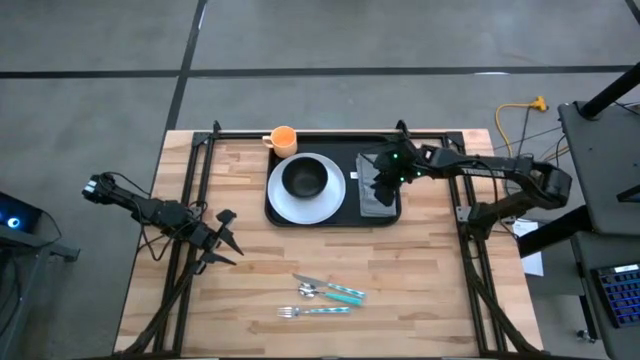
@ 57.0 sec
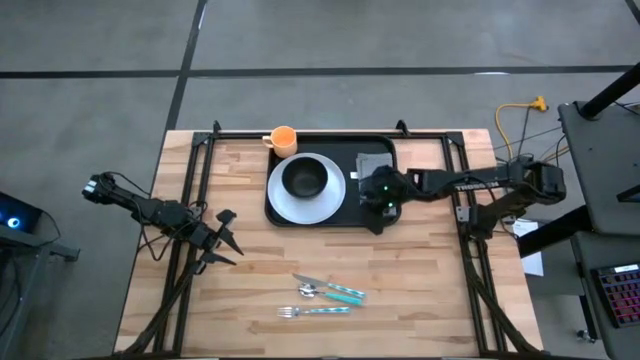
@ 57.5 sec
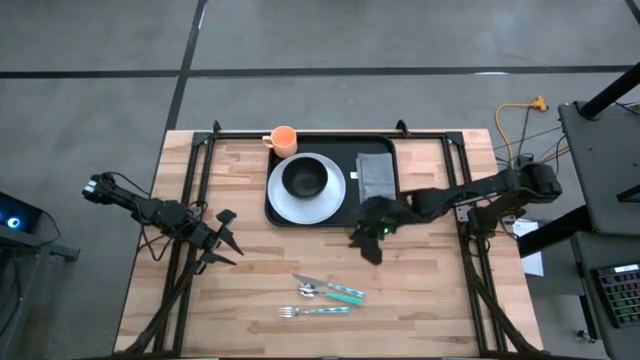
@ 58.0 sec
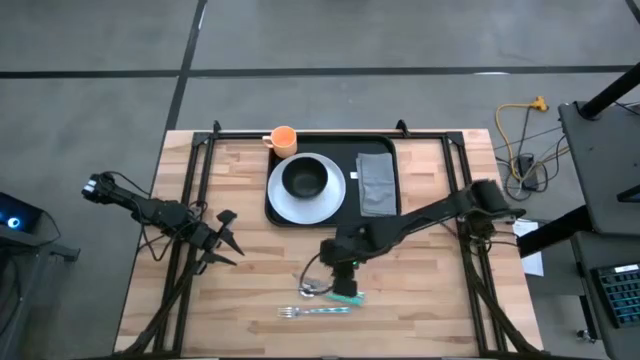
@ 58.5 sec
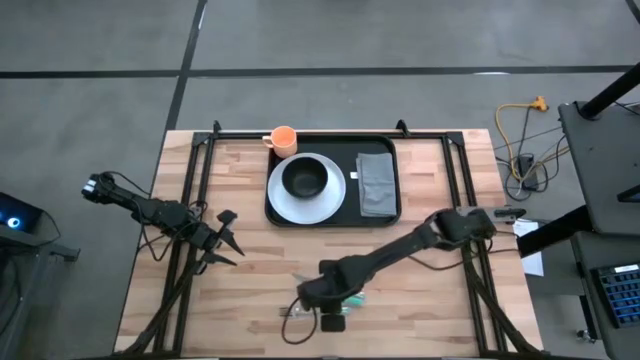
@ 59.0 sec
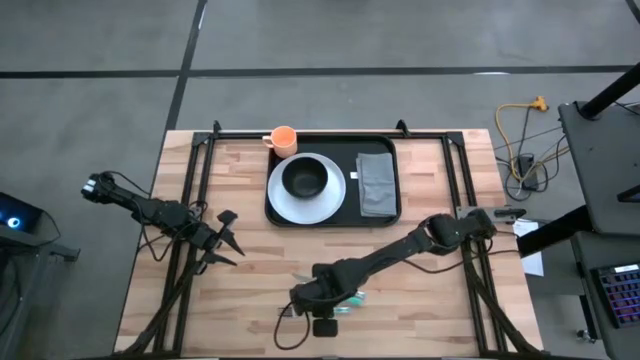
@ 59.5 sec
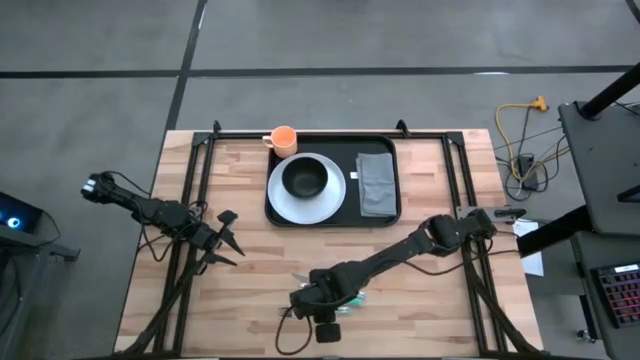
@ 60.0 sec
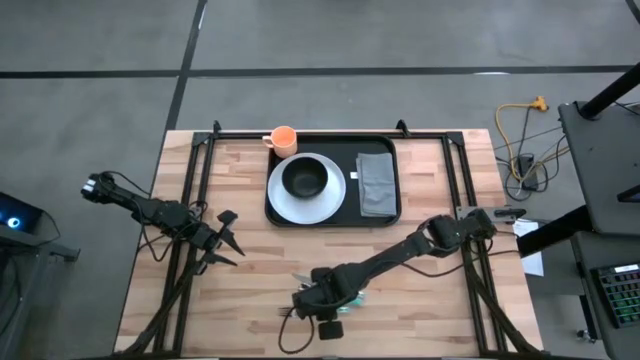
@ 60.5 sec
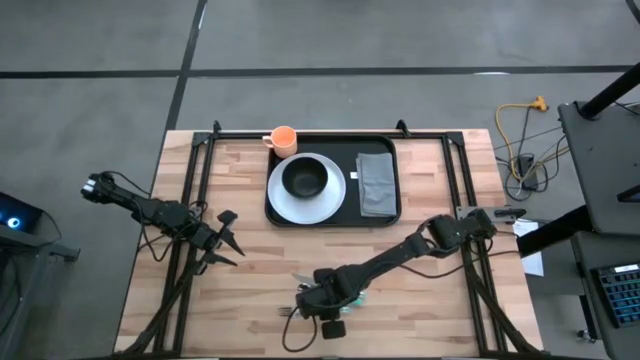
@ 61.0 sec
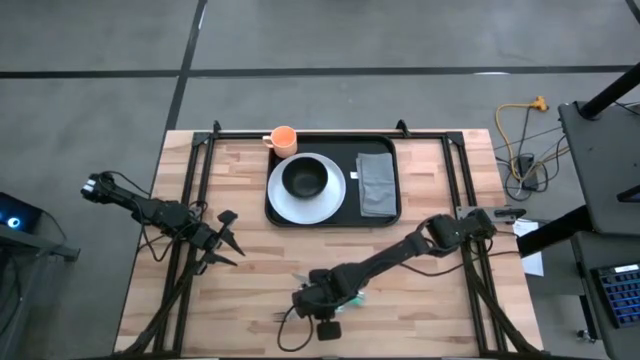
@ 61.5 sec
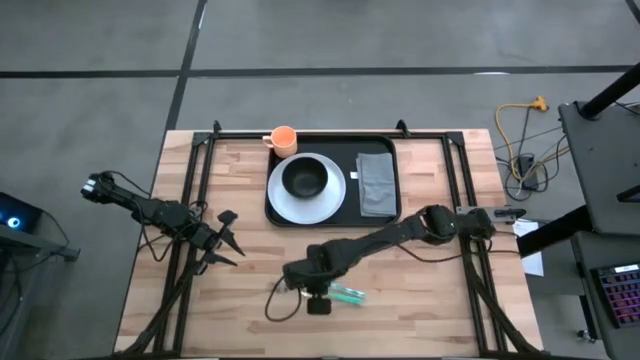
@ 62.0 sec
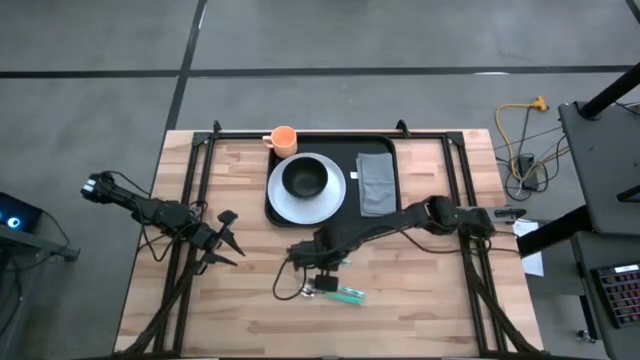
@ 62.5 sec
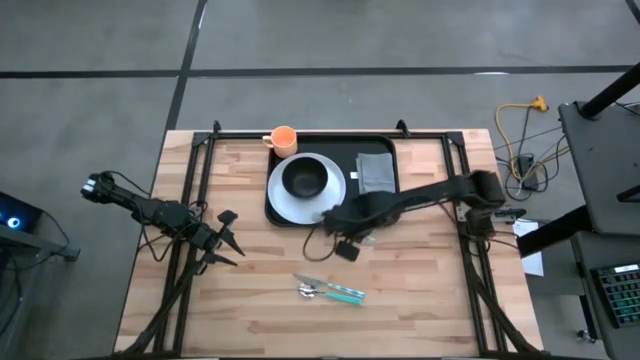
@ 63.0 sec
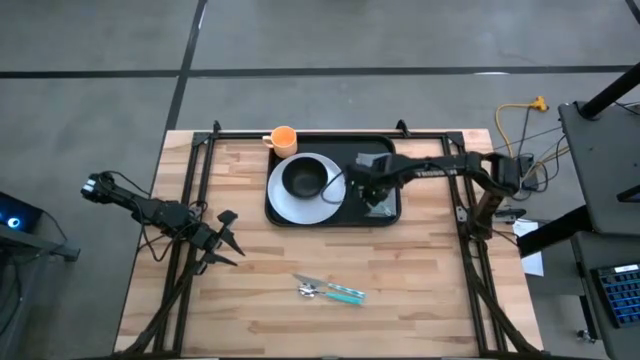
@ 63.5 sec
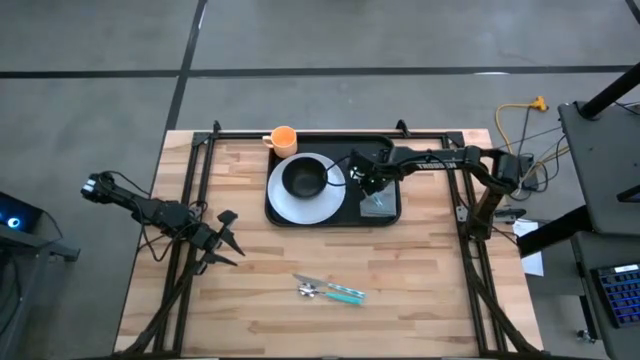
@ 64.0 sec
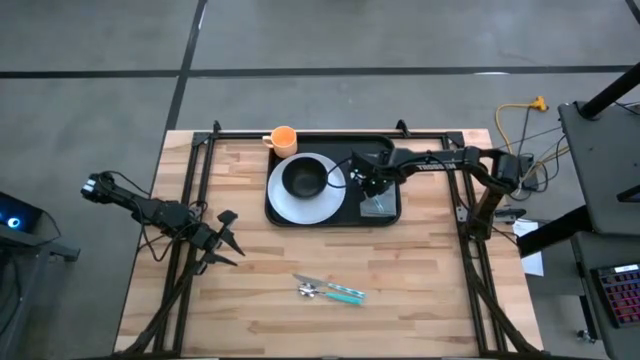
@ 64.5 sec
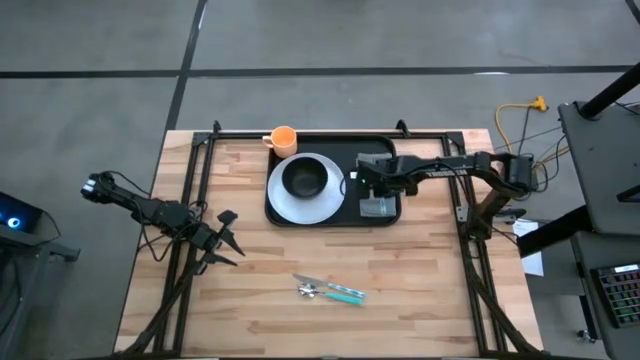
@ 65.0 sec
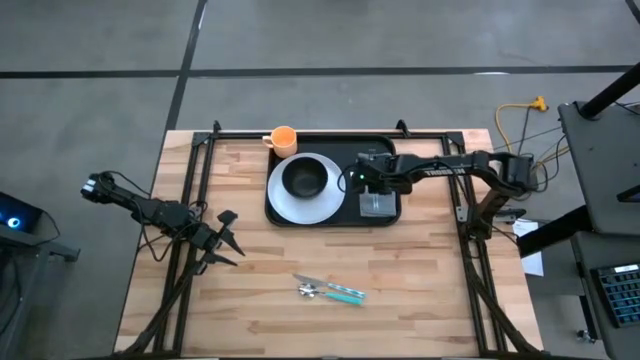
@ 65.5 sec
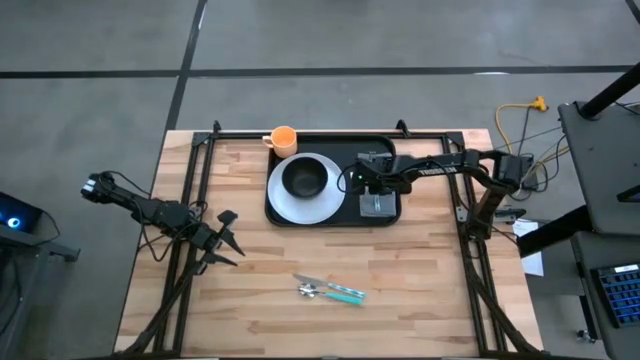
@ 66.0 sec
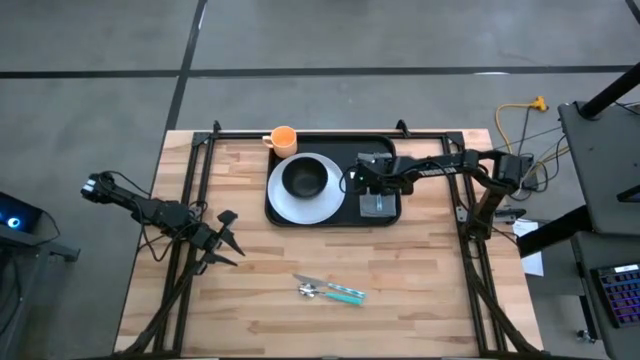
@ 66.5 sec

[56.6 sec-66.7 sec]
Task: Set up tray
Put the green fork on the gray napkin

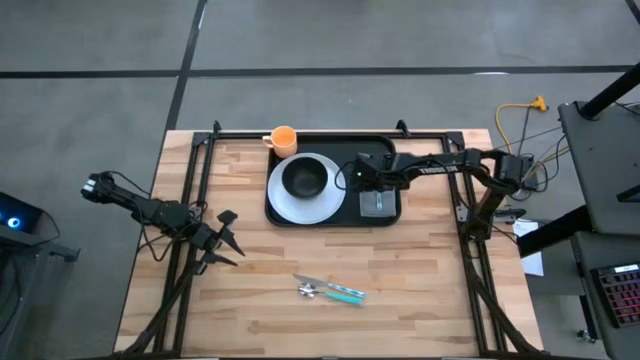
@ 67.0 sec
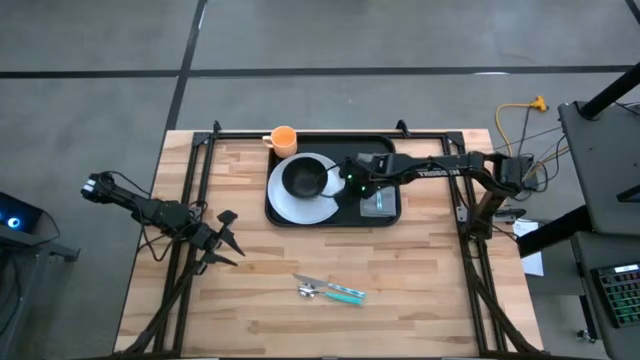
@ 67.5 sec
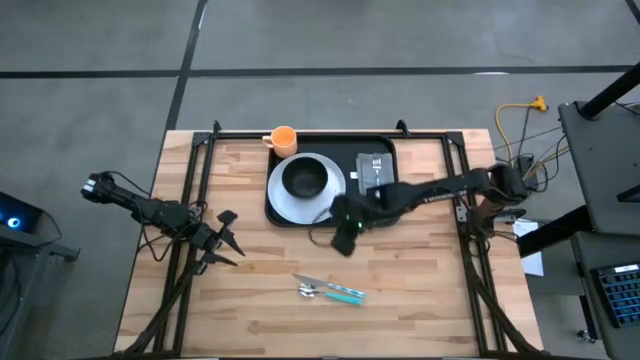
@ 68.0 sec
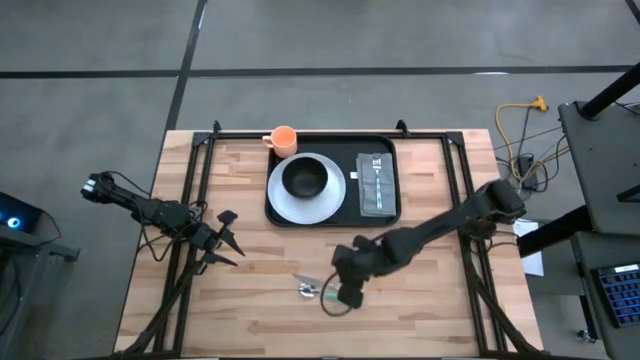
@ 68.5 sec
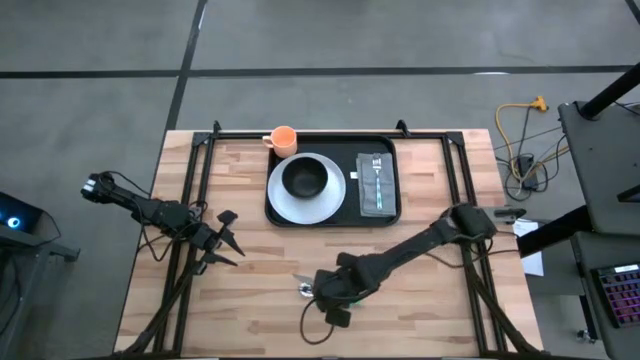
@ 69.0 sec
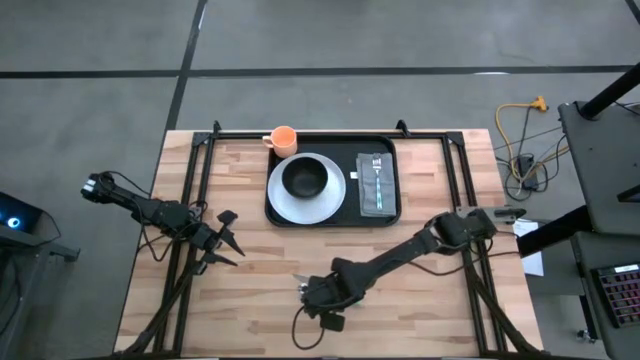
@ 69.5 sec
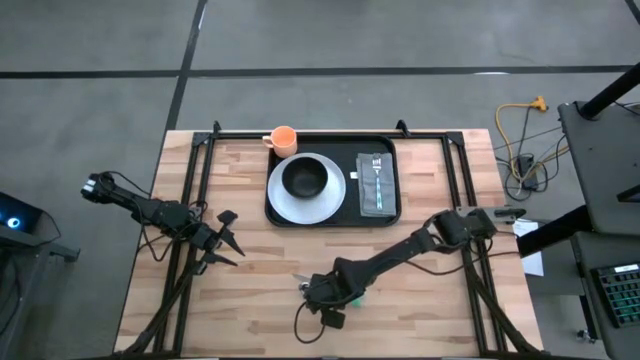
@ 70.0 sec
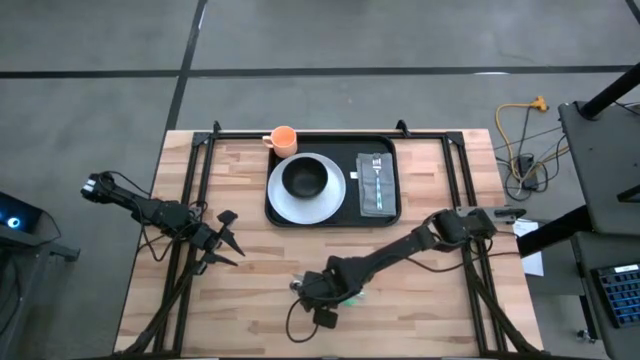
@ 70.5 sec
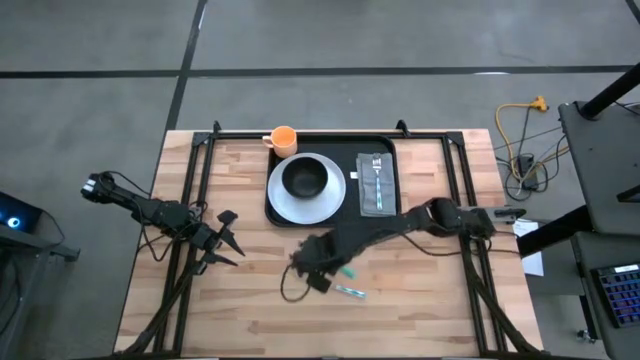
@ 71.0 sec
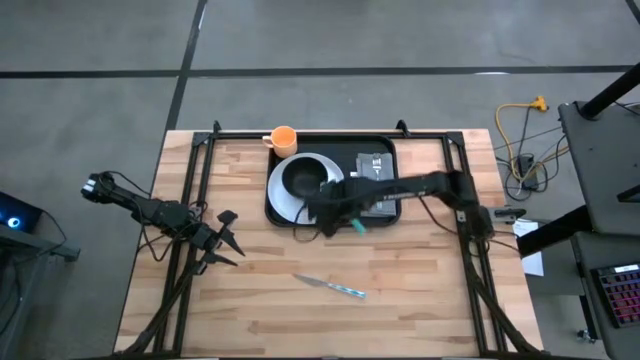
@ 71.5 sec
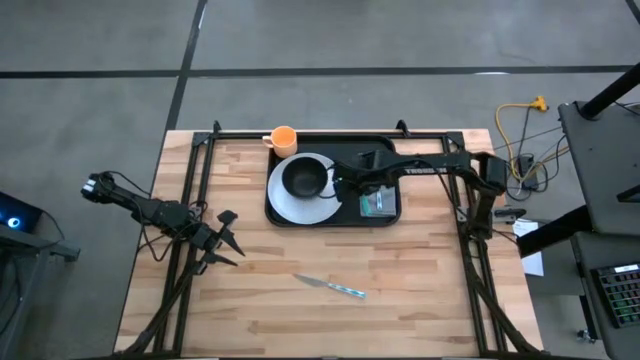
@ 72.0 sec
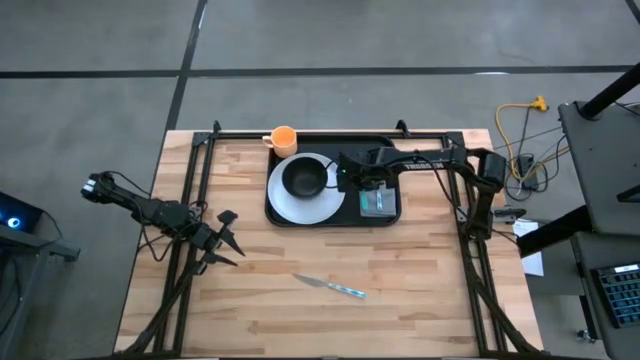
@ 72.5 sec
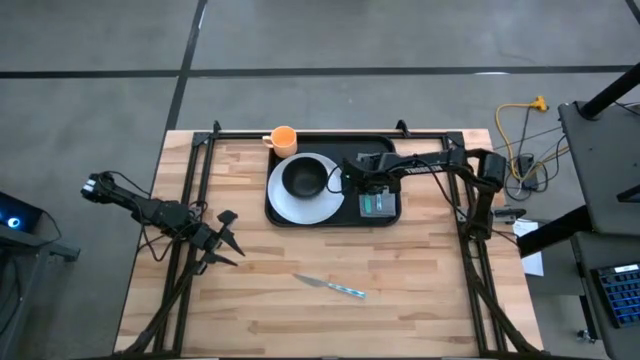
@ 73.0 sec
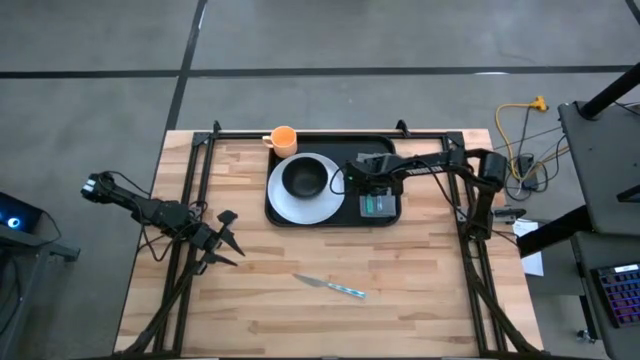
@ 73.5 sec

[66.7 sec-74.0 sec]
Put the green spoon on the gray napkin

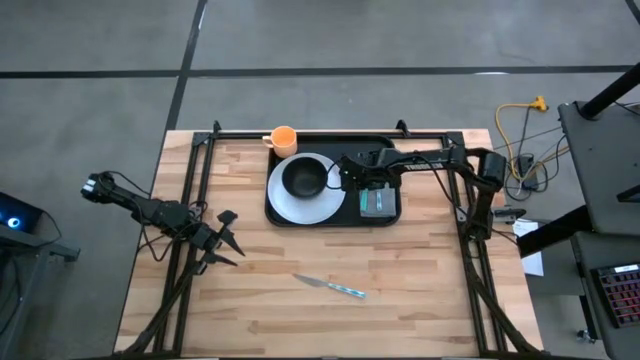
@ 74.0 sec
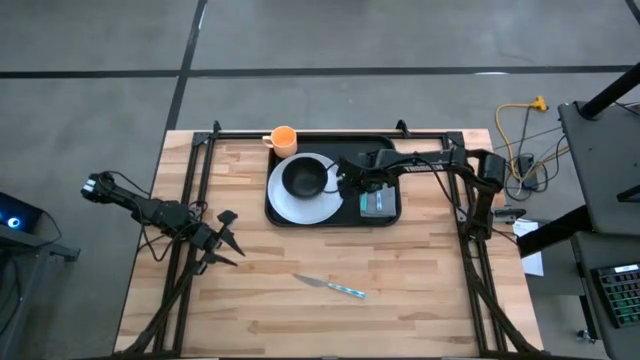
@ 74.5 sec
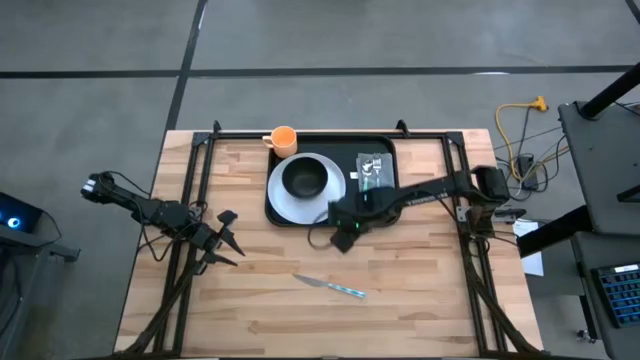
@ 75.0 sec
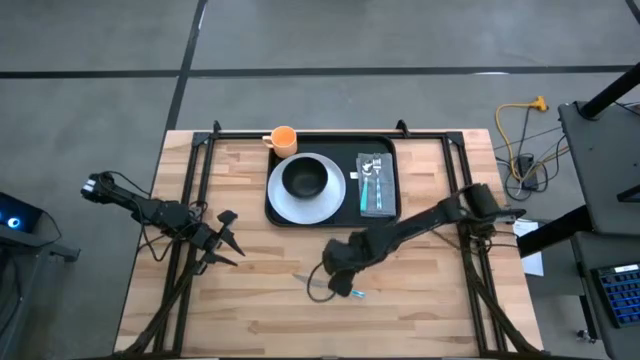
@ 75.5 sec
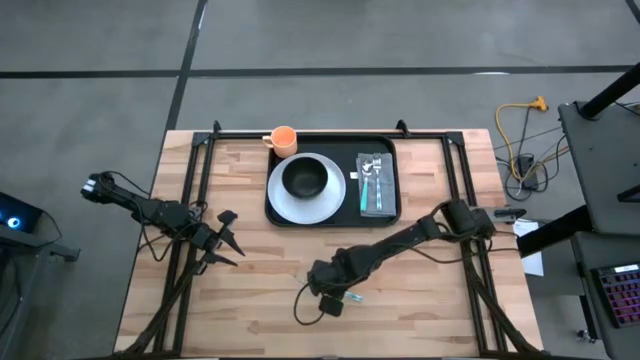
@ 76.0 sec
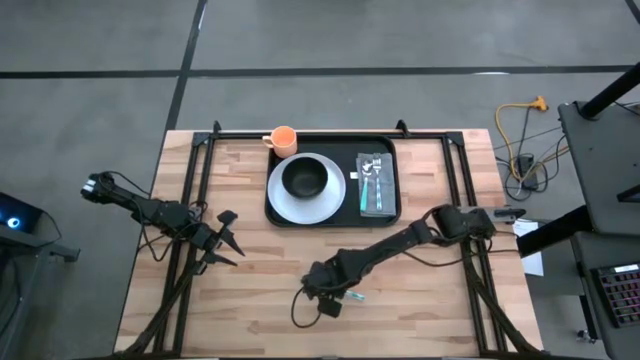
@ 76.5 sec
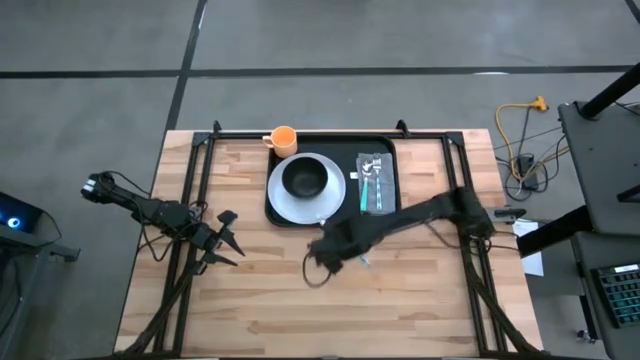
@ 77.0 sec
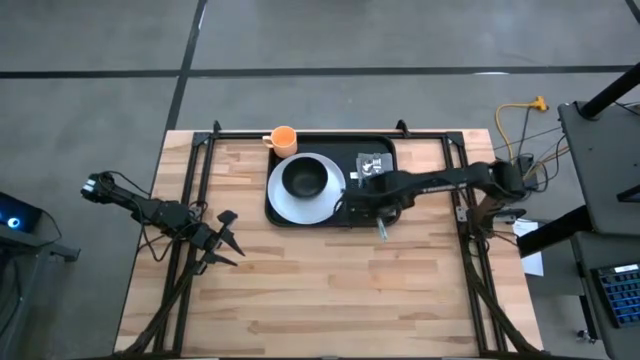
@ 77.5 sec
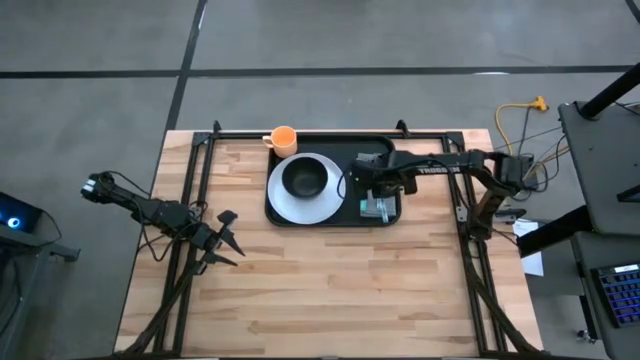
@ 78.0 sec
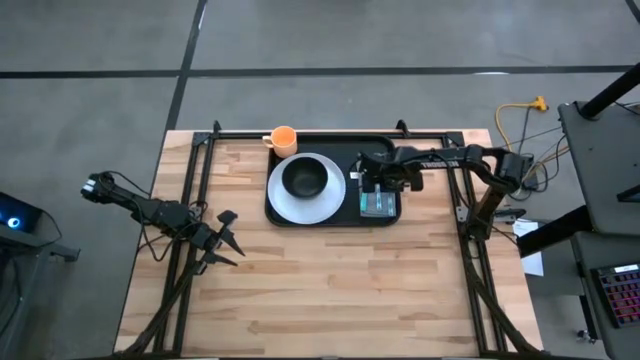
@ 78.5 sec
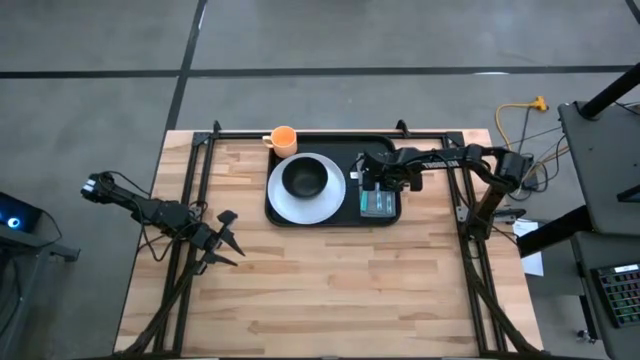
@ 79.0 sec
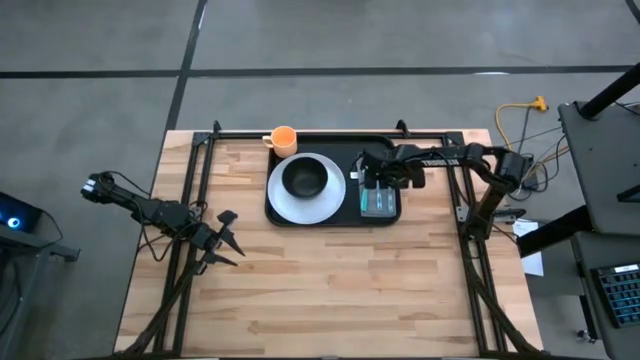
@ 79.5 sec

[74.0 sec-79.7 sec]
Put the green knife on the gray napkin
